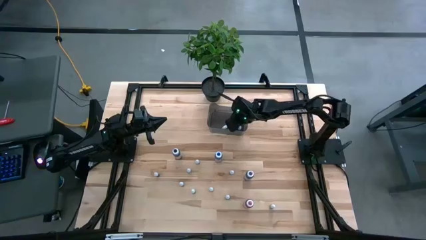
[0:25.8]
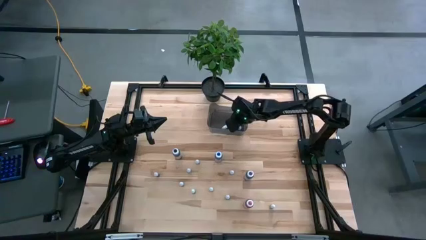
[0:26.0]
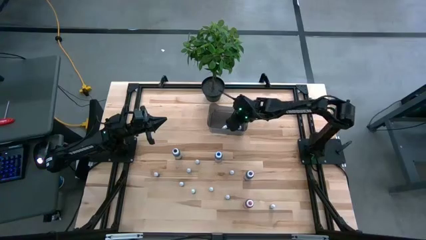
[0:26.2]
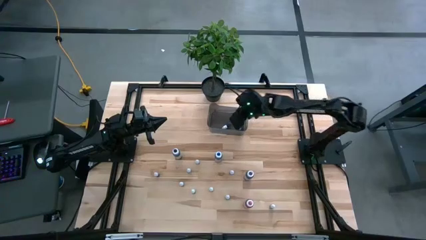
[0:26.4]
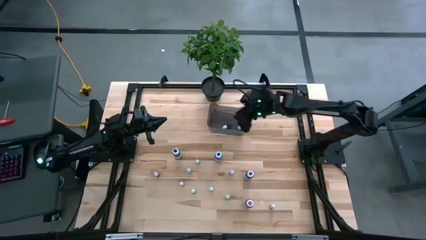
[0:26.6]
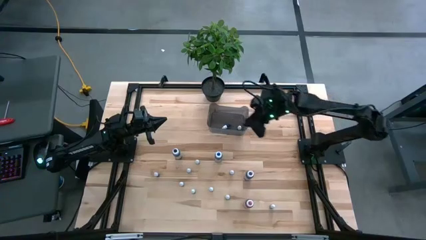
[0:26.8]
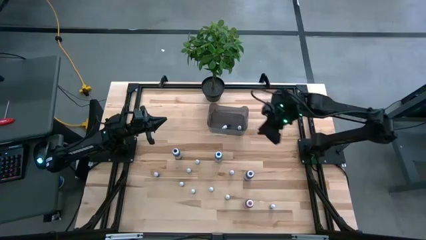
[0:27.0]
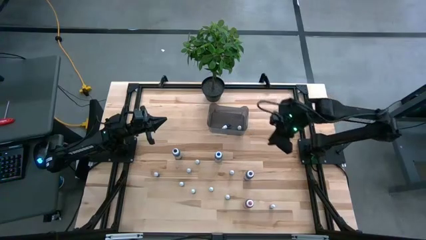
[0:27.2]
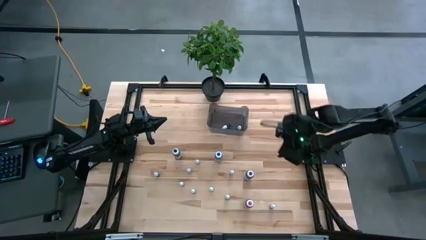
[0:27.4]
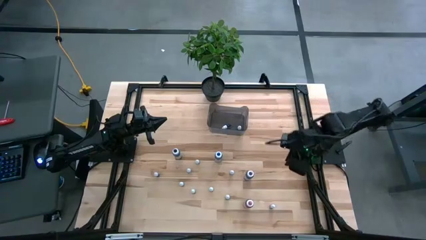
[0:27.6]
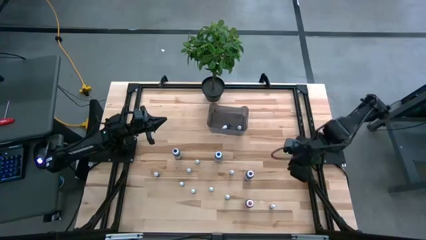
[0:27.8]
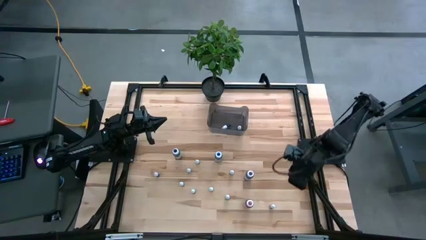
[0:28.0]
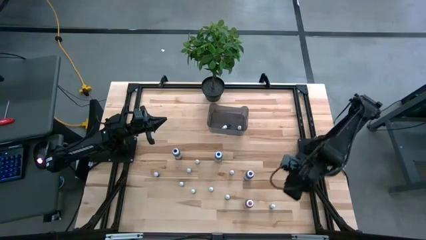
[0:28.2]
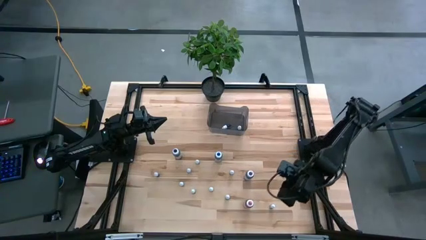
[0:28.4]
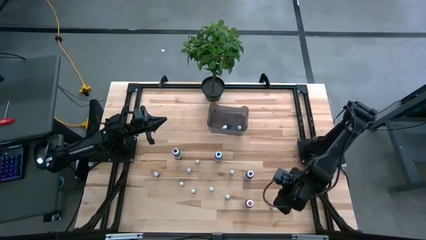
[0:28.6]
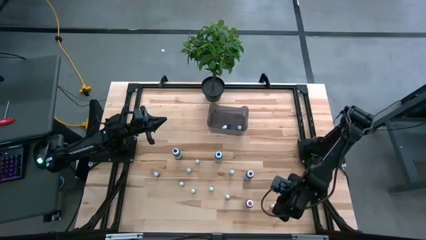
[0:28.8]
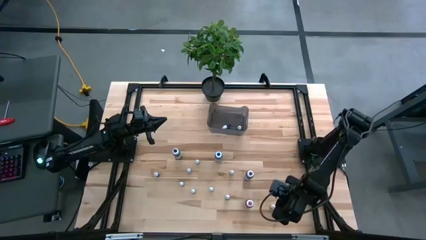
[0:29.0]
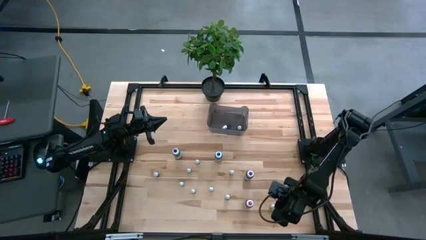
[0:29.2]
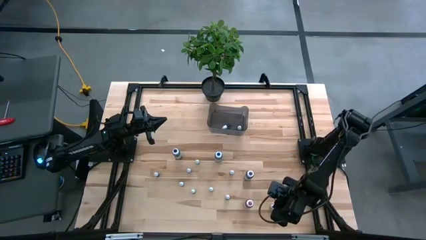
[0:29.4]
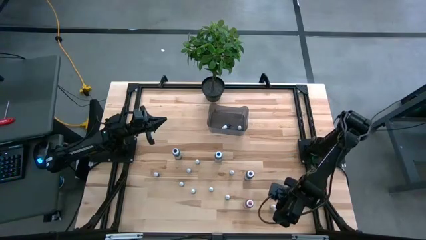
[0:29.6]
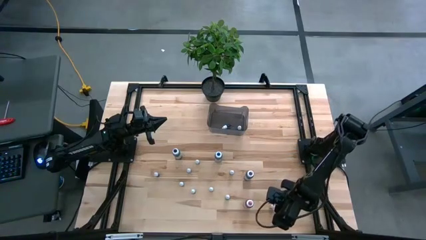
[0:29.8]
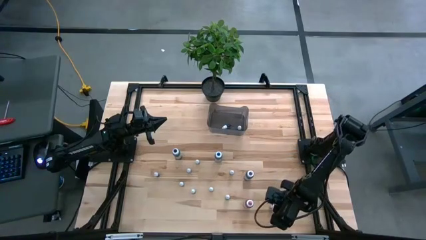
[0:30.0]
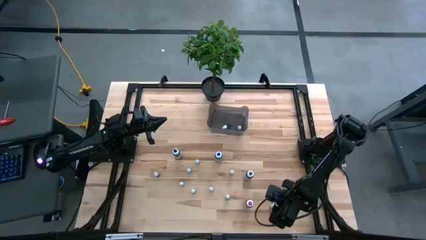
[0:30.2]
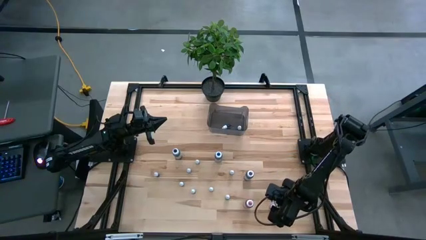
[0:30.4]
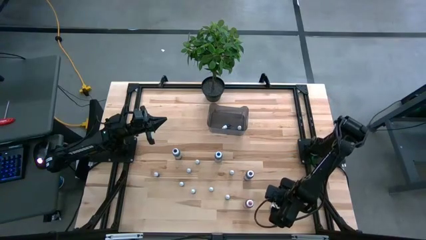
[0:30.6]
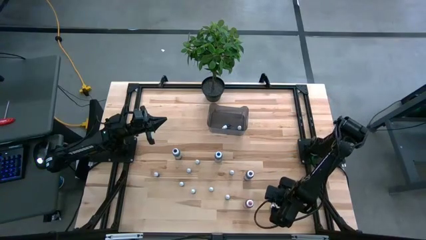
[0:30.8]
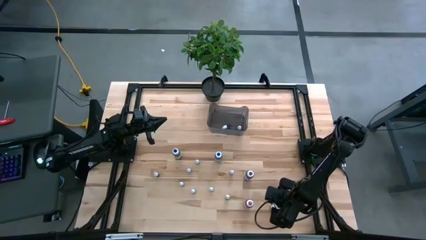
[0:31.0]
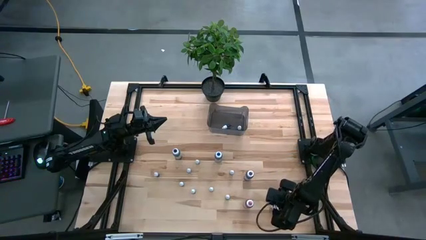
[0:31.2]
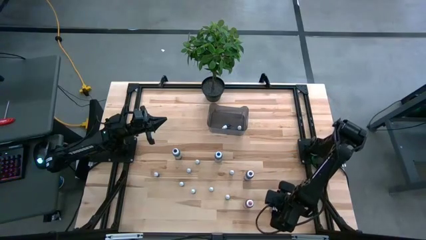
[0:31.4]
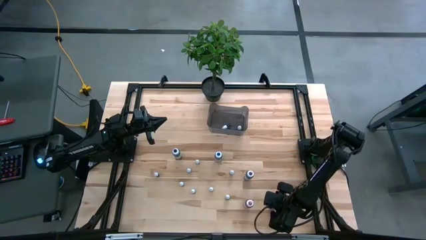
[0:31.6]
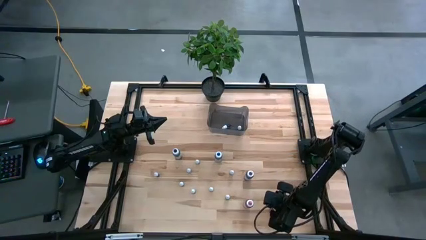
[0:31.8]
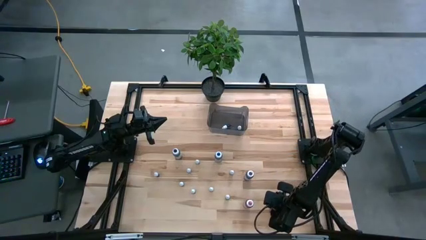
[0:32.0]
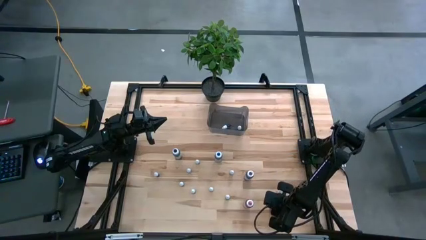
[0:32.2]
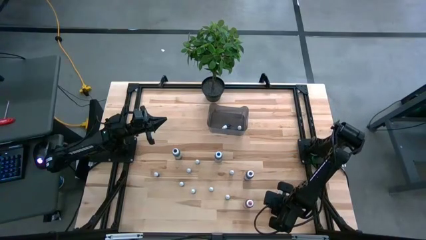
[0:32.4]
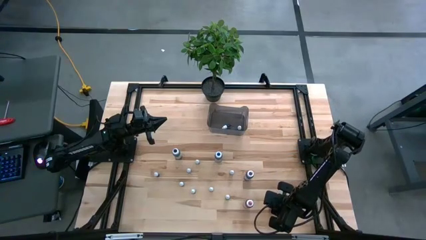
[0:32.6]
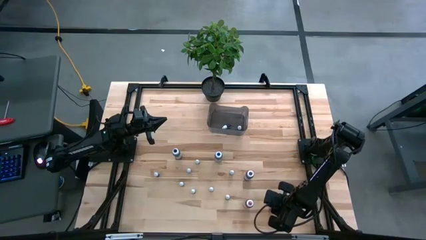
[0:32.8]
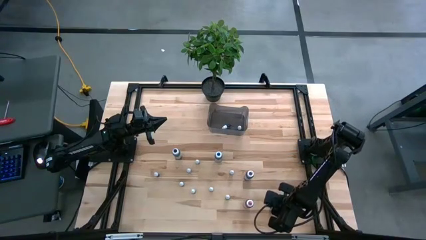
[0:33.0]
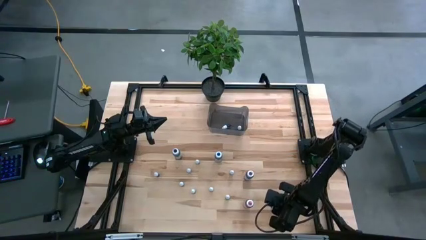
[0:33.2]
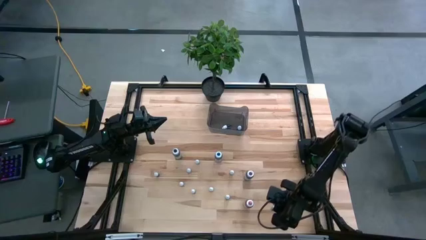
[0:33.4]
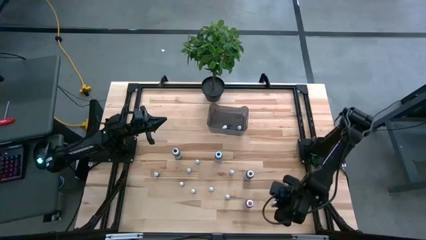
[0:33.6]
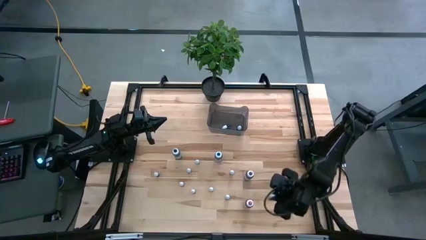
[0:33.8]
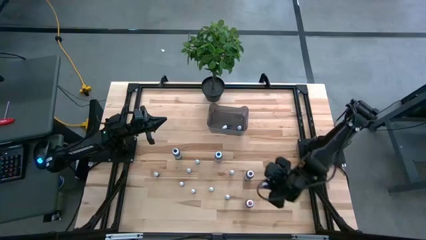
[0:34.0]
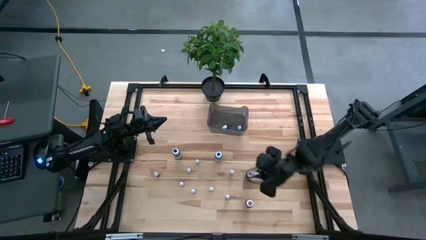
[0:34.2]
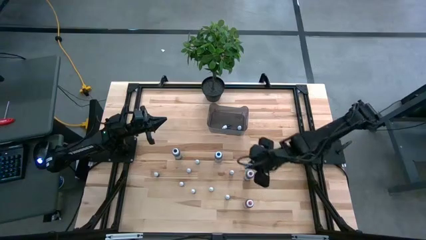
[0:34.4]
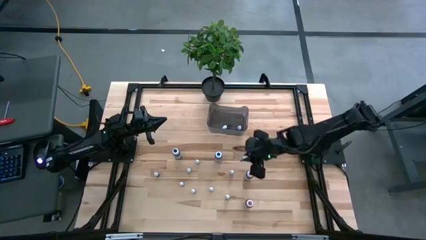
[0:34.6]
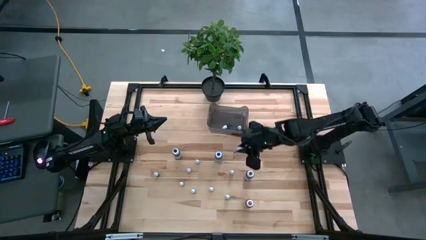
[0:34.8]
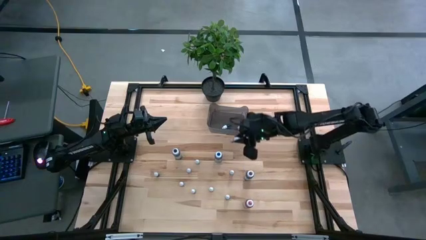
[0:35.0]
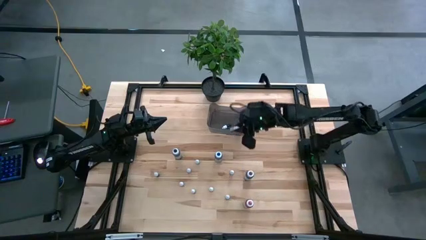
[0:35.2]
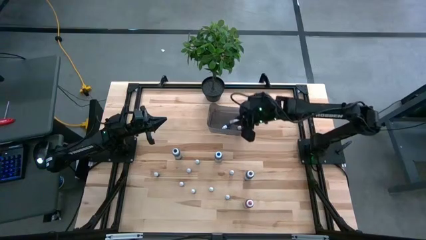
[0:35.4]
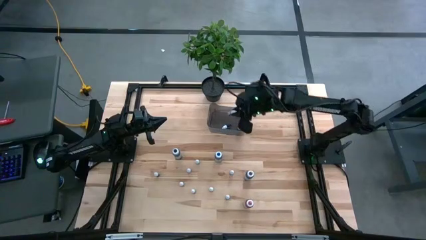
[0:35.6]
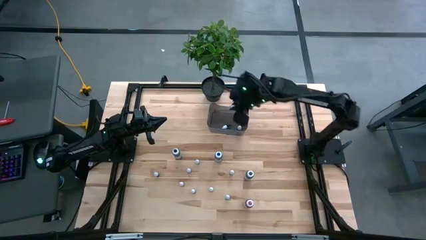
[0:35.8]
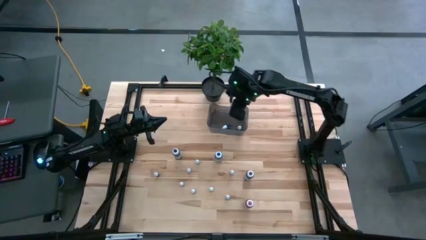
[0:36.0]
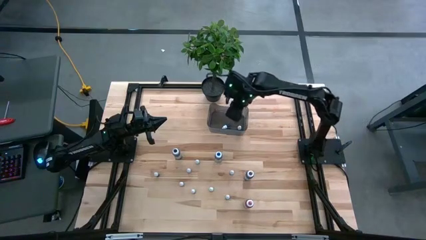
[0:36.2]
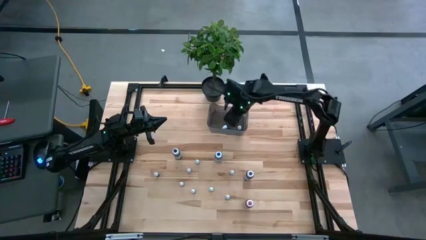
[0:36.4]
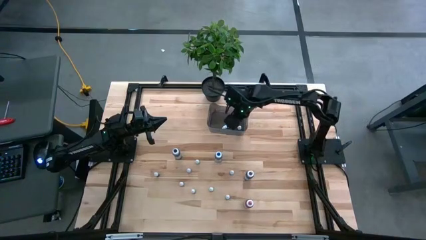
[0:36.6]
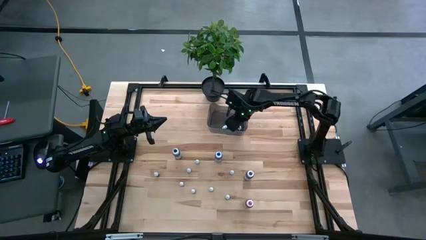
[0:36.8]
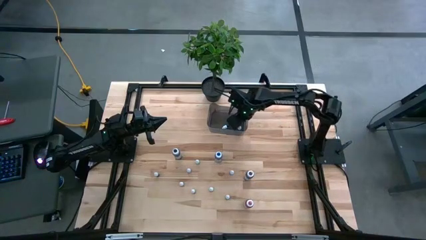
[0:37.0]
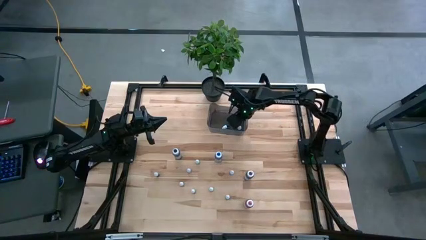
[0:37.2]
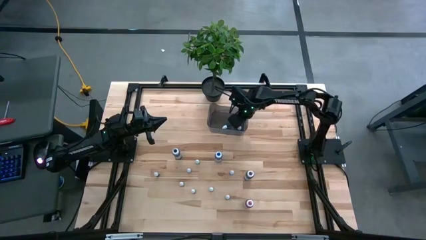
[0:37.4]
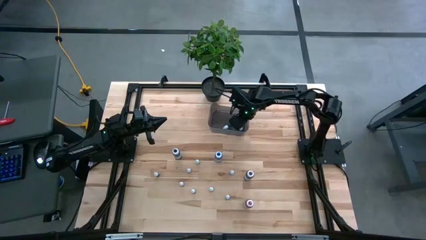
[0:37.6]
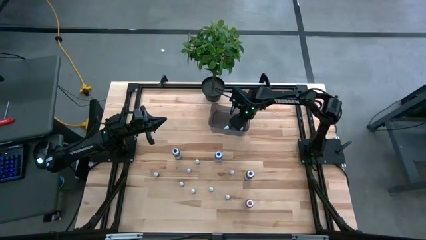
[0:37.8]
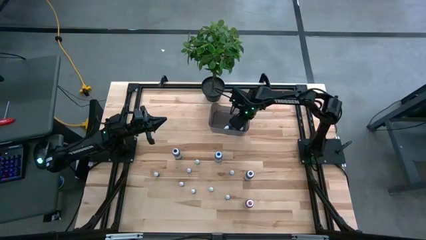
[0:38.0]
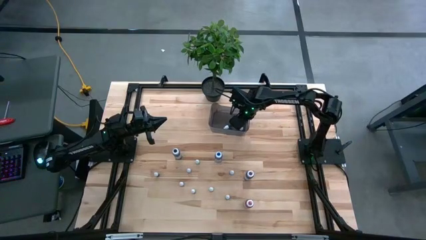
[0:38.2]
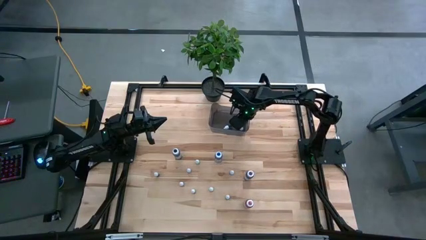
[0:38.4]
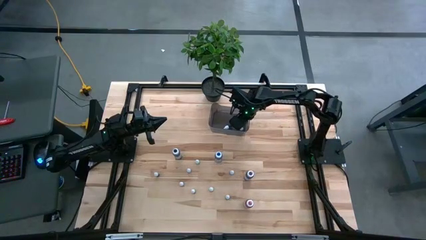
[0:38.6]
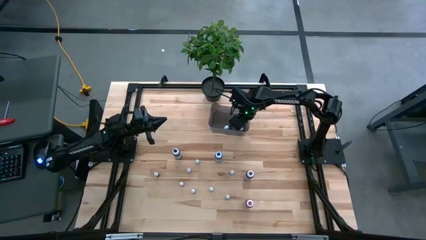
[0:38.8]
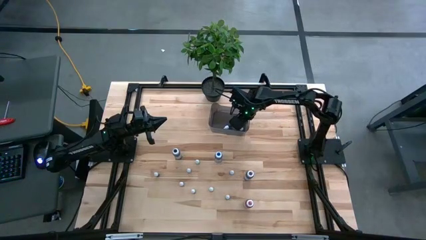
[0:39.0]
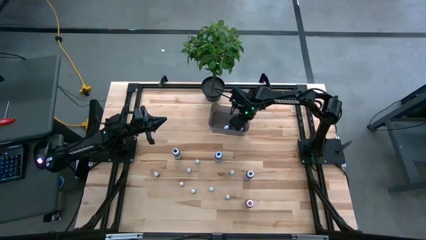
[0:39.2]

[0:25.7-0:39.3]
Task: Pick & Place food coloring
Put the small orange food coloring bottle into the black bin

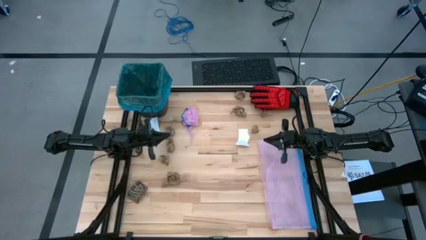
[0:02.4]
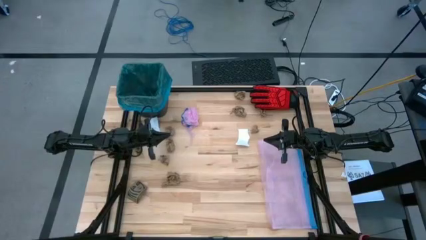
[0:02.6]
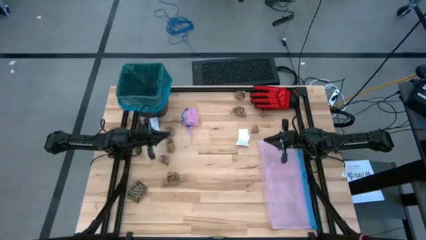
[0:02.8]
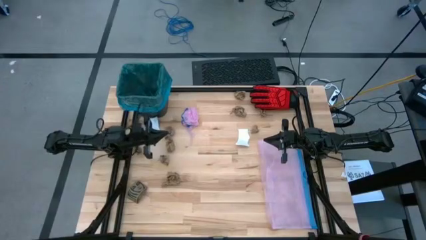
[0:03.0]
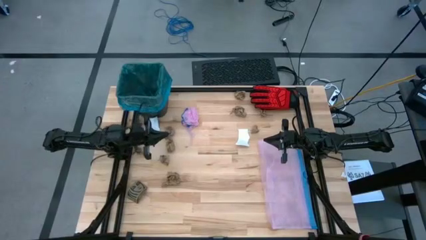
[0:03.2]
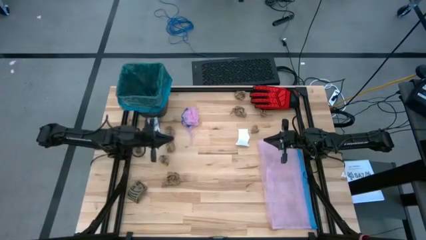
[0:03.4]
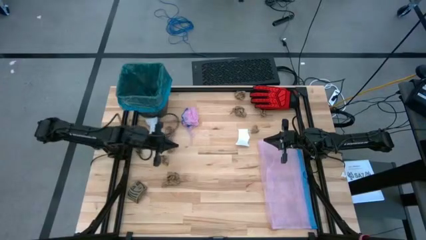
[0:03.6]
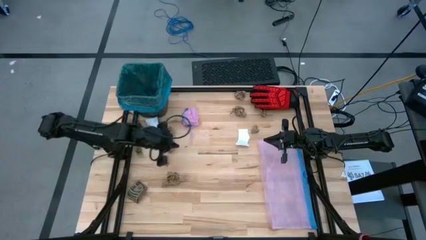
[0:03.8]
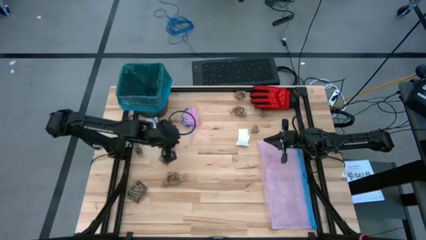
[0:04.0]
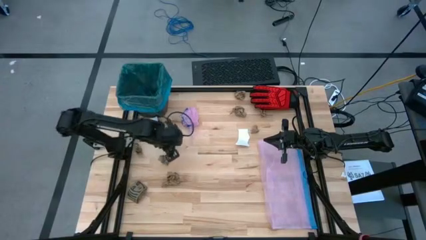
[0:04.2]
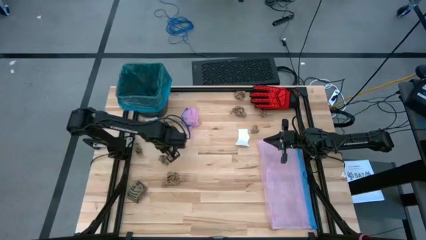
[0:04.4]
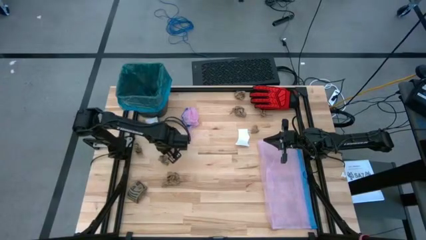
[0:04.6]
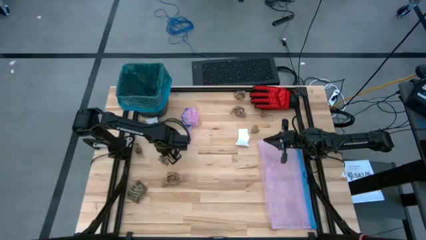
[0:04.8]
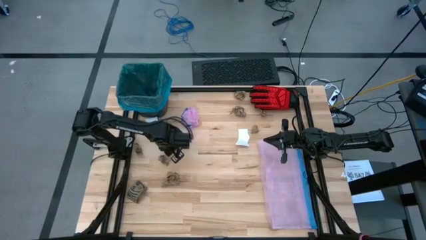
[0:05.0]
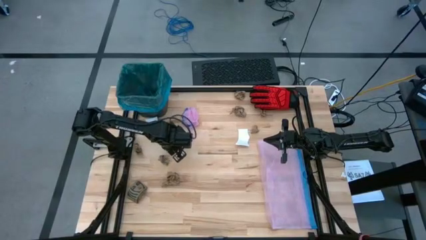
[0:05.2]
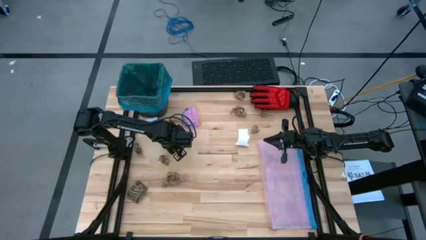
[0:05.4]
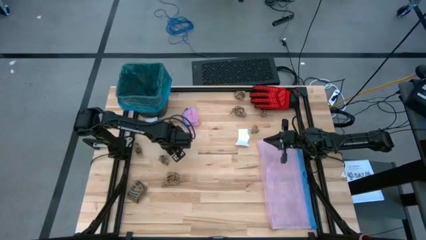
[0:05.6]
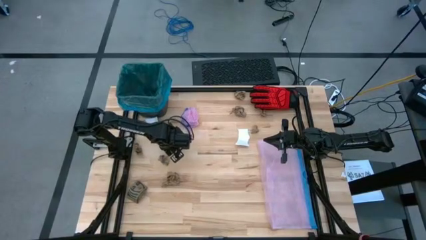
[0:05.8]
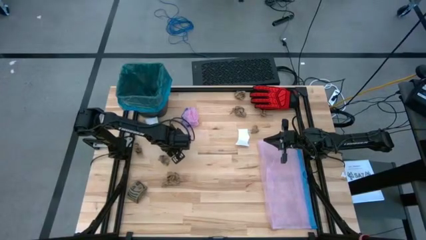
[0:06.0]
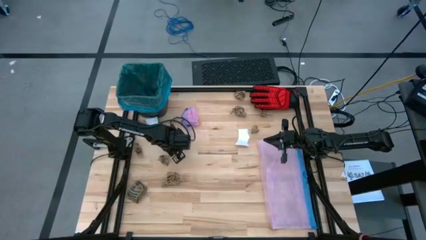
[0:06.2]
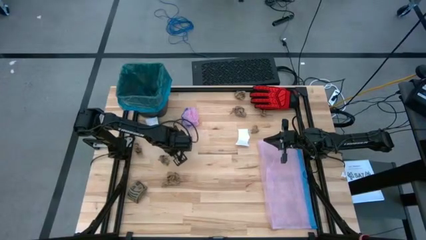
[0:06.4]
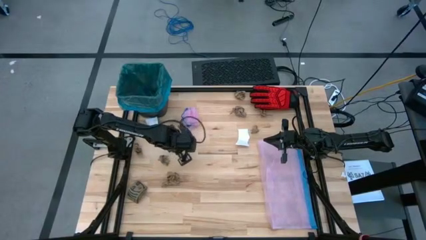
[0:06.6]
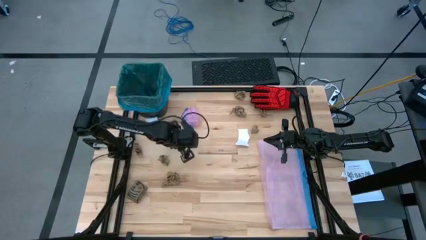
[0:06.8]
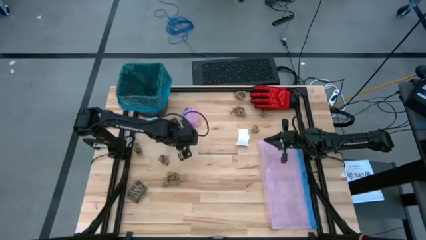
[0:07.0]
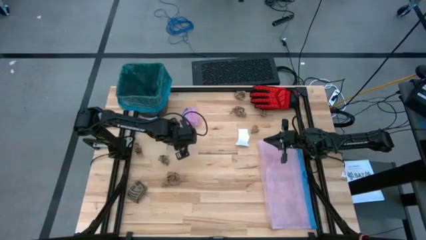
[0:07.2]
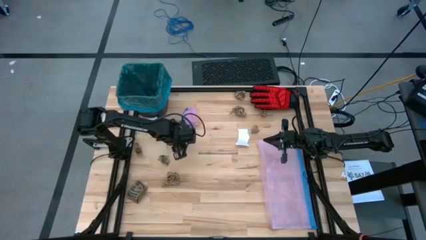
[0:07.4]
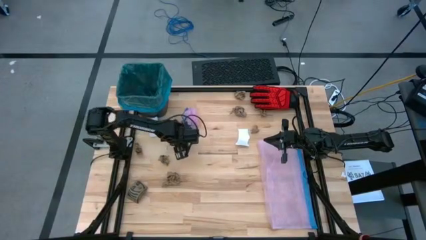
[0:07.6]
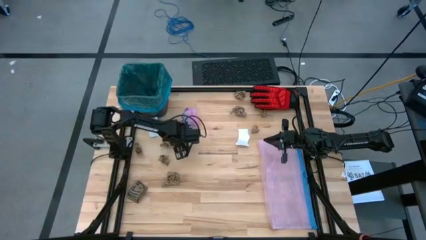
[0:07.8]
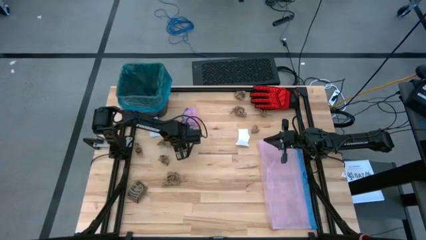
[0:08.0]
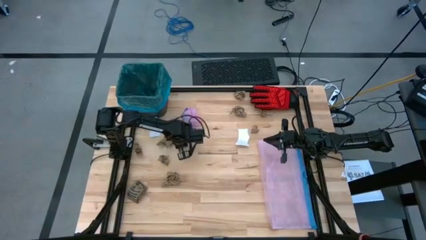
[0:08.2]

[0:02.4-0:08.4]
Task: place trash/remove bag and relplace
Put the brown napkin into the black trash bin
